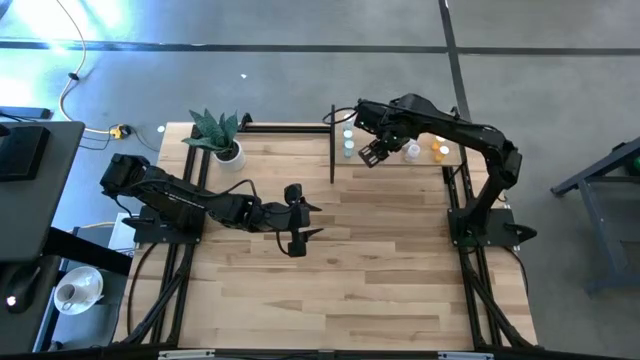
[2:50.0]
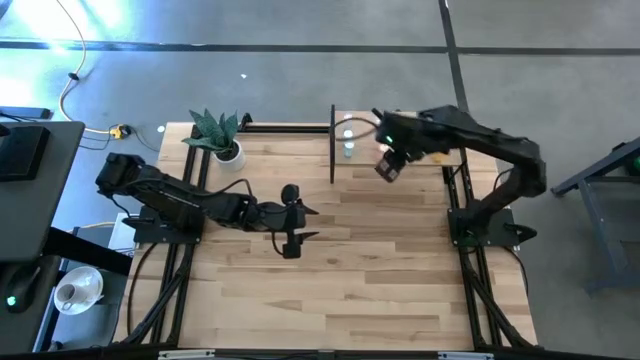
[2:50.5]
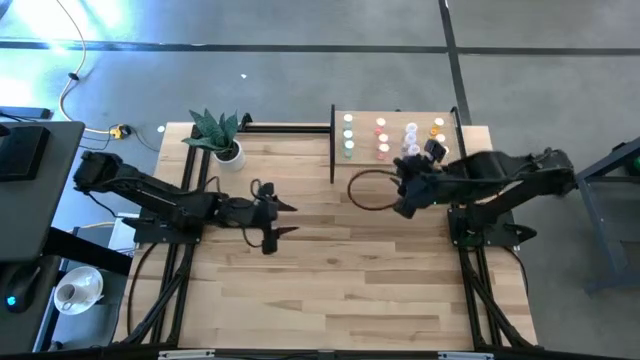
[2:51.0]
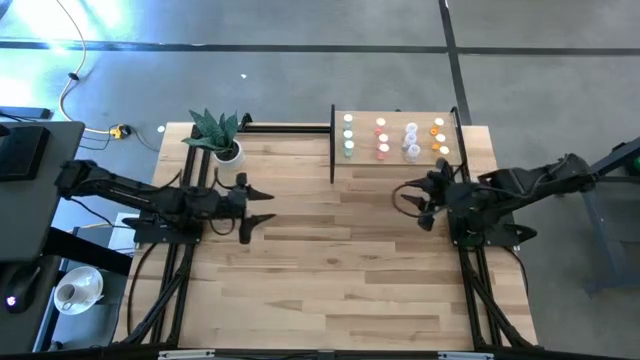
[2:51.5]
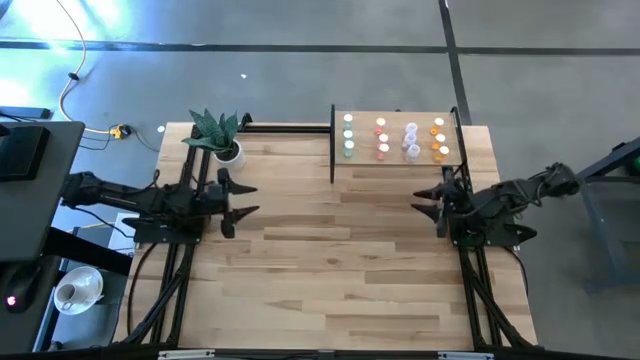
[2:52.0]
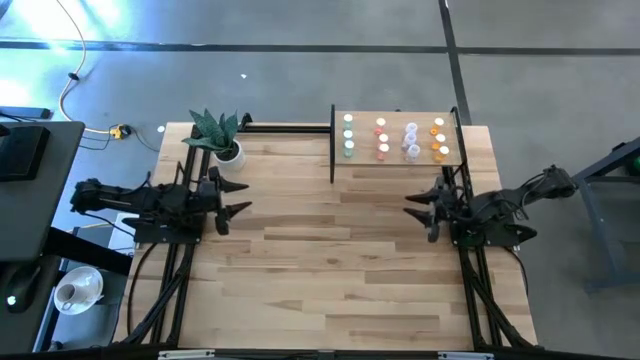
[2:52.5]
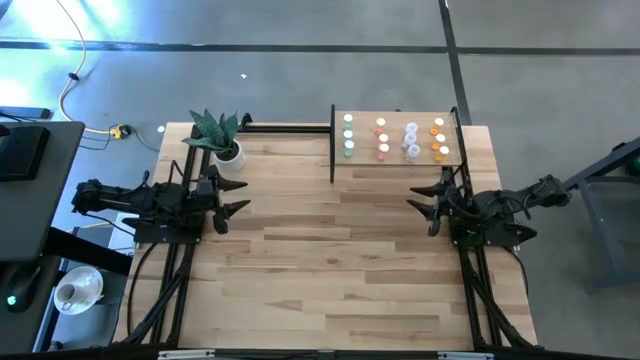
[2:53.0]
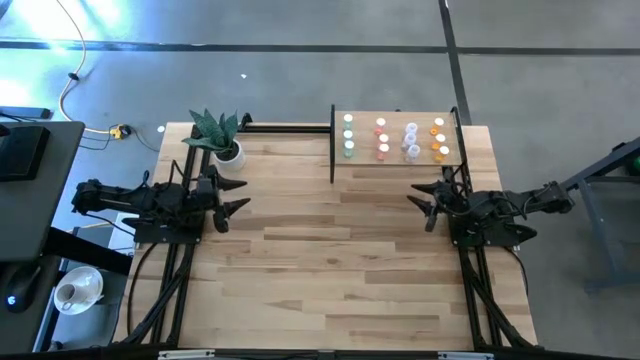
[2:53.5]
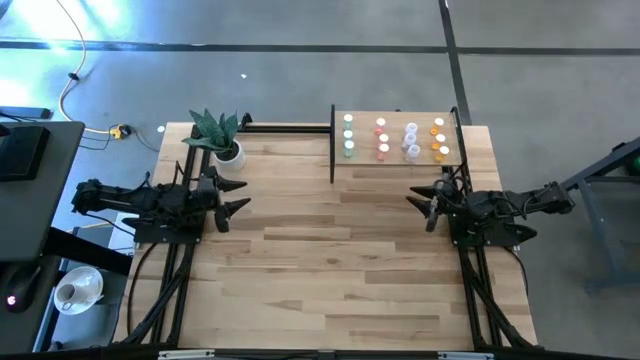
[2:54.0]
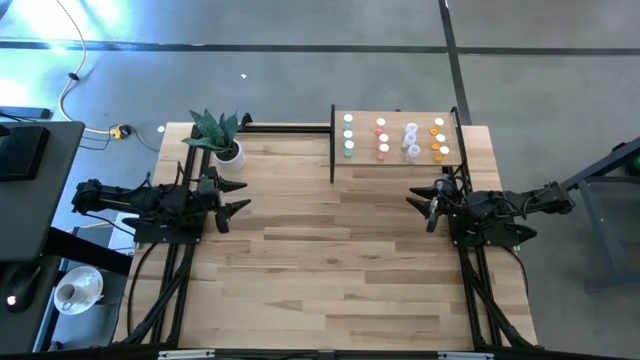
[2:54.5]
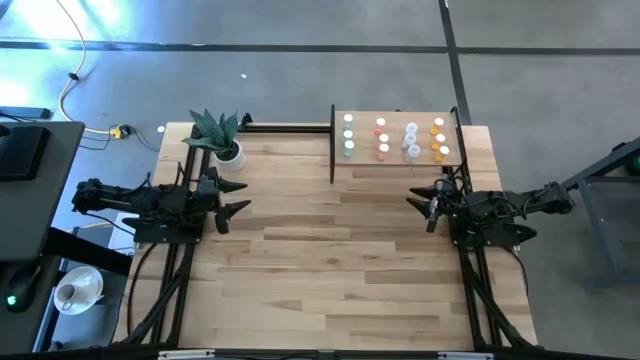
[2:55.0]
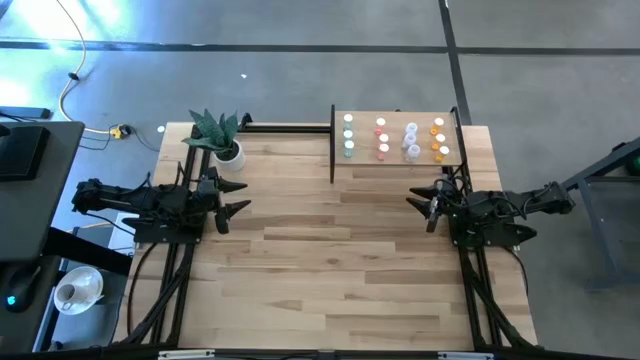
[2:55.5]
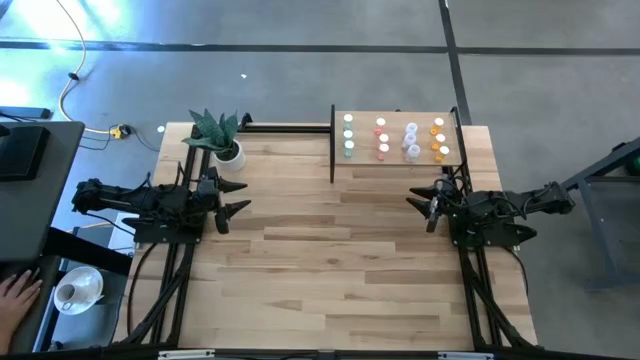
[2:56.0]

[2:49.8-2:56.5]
Task: Pick and place medicine bottles onto shelf by color
Return to Home position

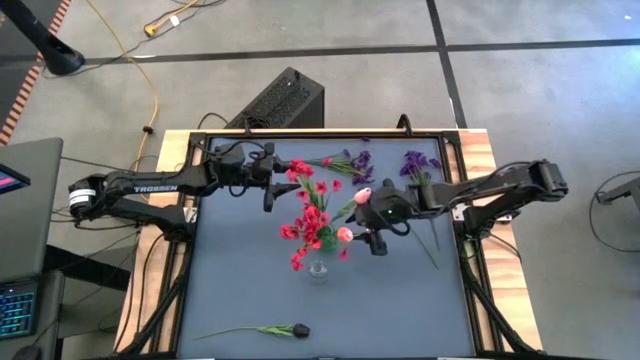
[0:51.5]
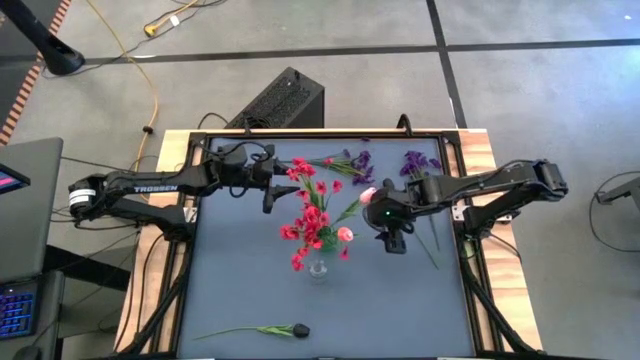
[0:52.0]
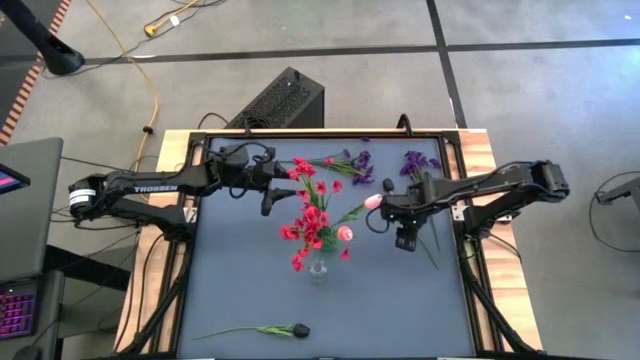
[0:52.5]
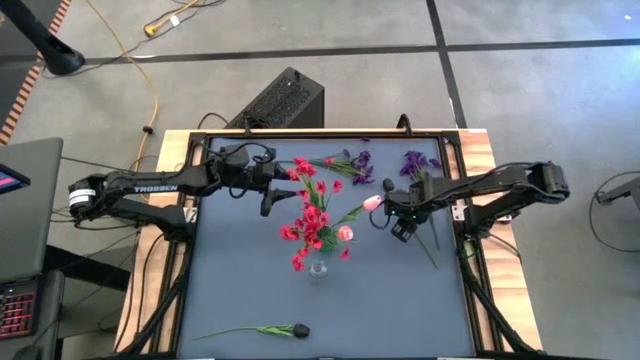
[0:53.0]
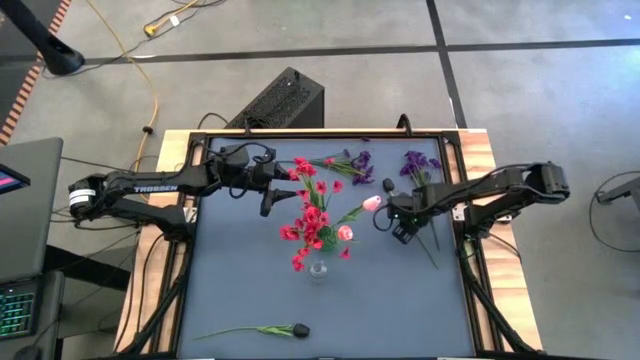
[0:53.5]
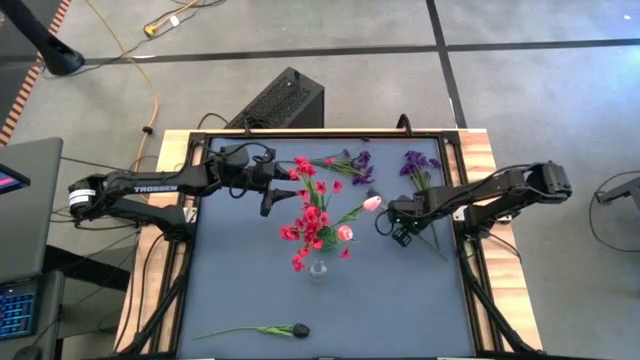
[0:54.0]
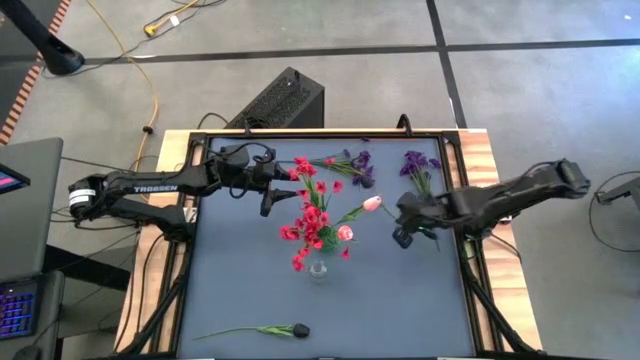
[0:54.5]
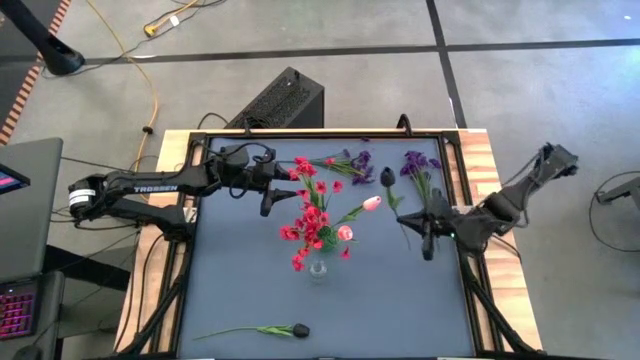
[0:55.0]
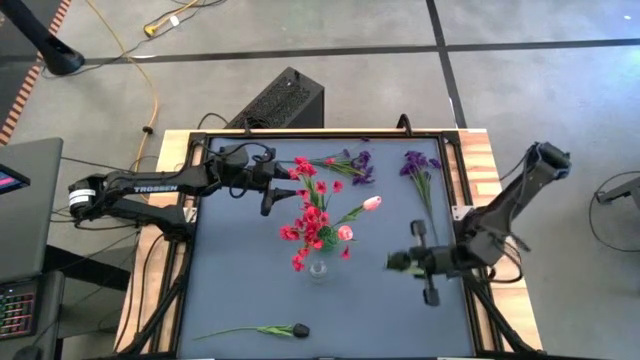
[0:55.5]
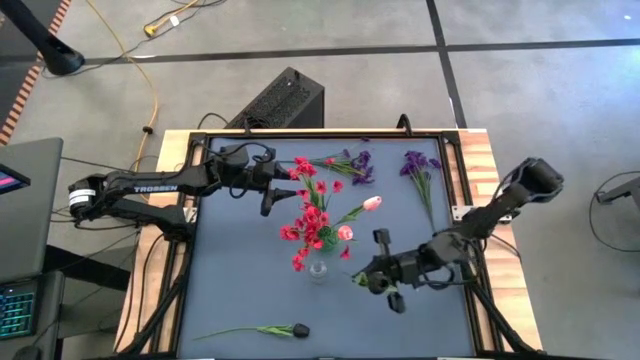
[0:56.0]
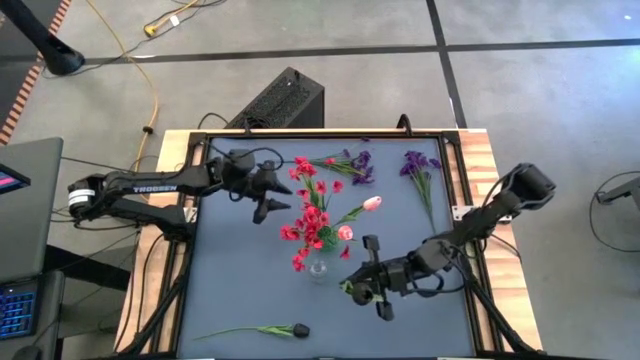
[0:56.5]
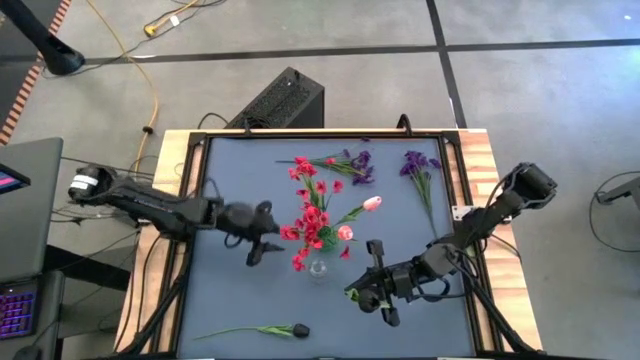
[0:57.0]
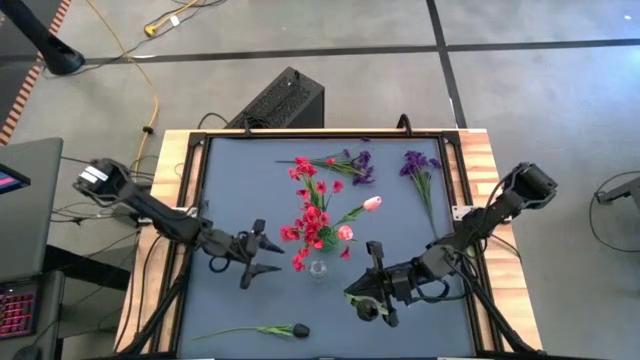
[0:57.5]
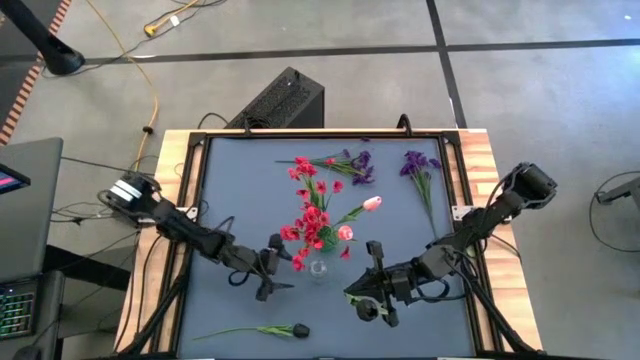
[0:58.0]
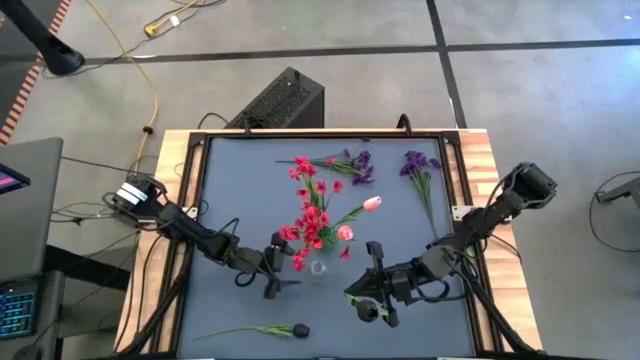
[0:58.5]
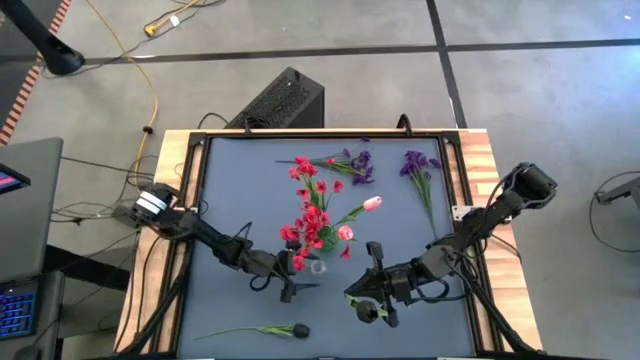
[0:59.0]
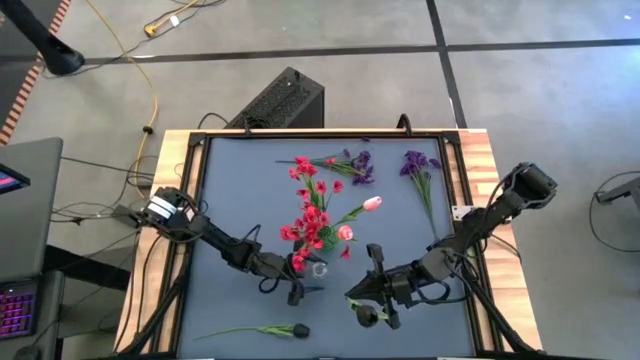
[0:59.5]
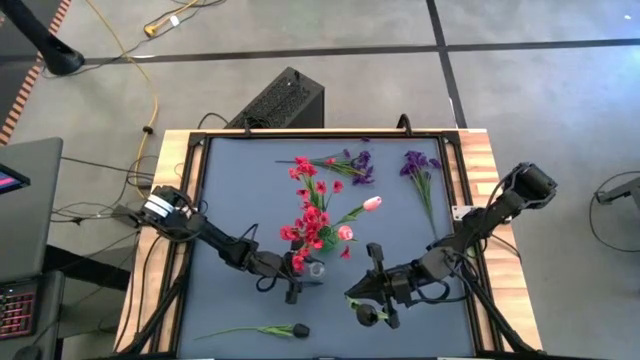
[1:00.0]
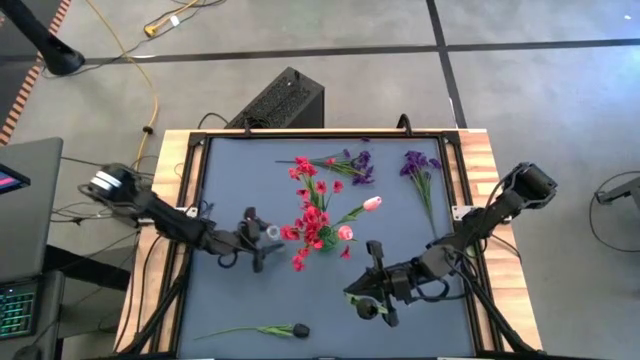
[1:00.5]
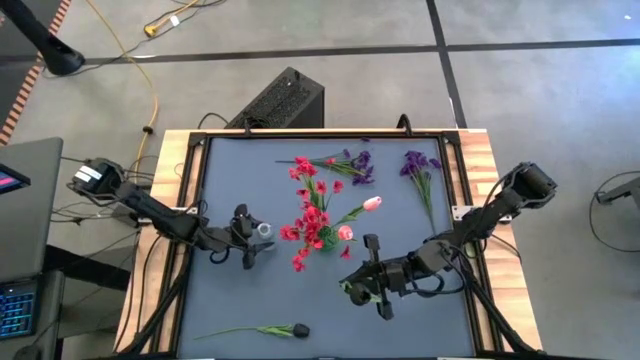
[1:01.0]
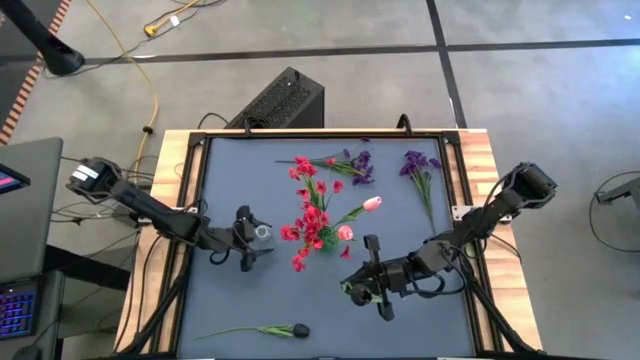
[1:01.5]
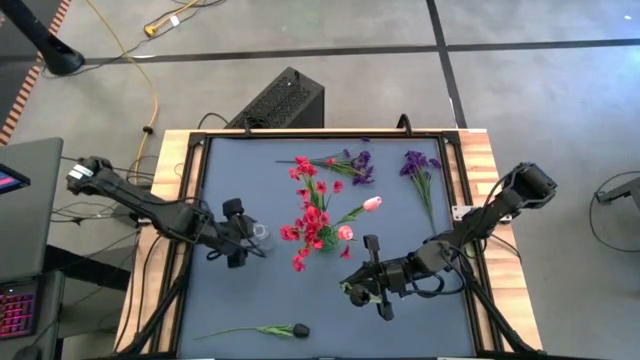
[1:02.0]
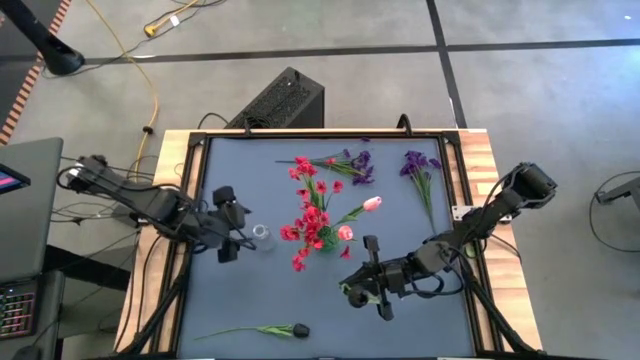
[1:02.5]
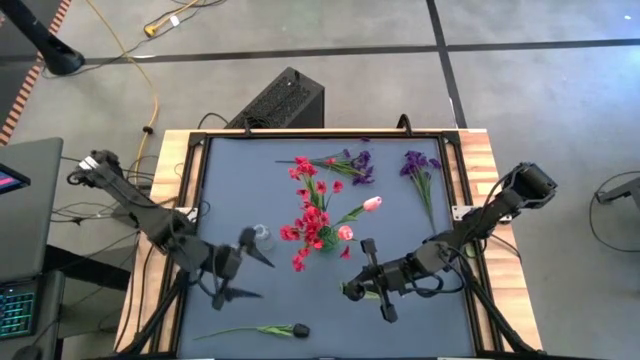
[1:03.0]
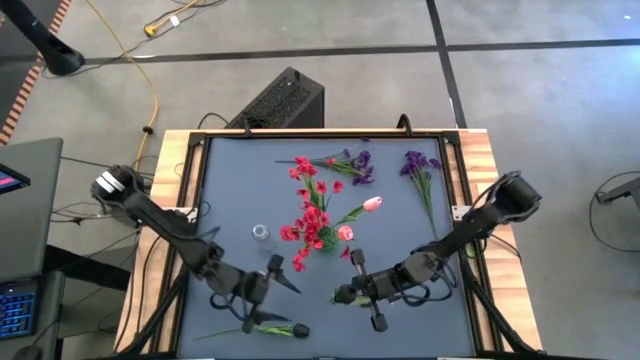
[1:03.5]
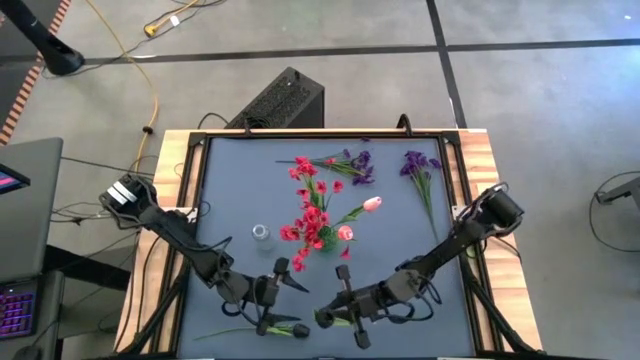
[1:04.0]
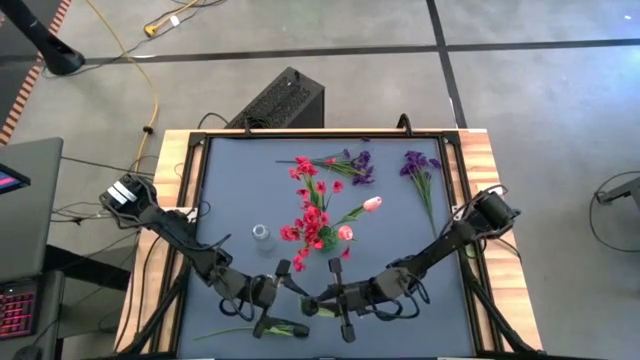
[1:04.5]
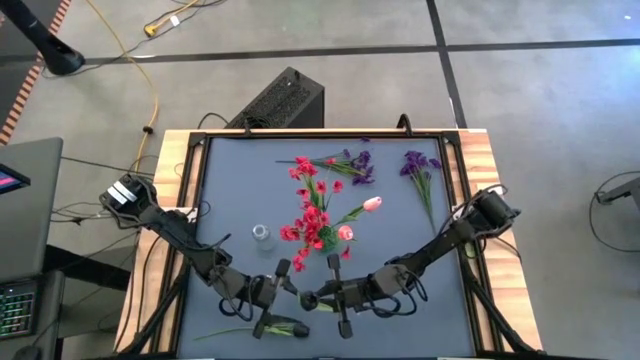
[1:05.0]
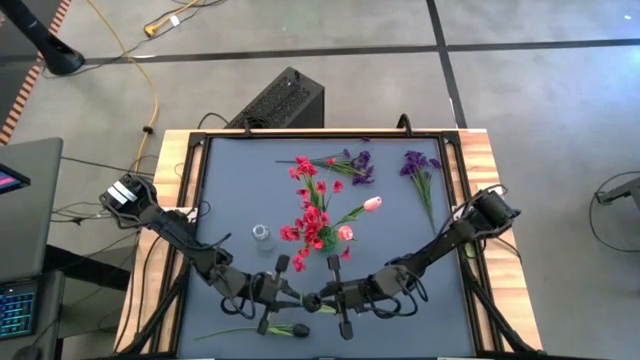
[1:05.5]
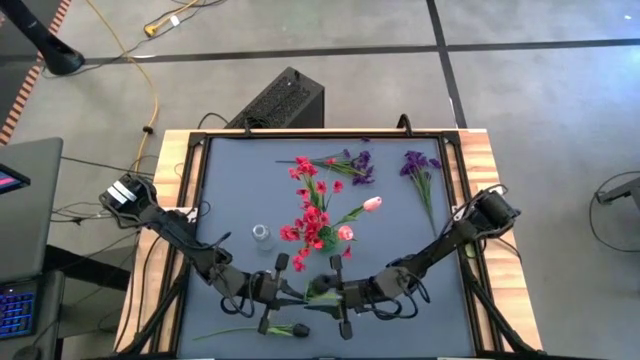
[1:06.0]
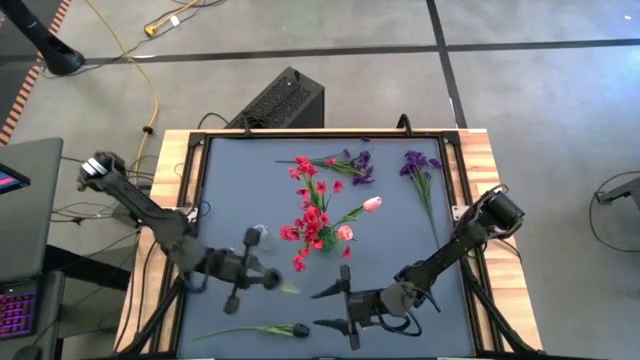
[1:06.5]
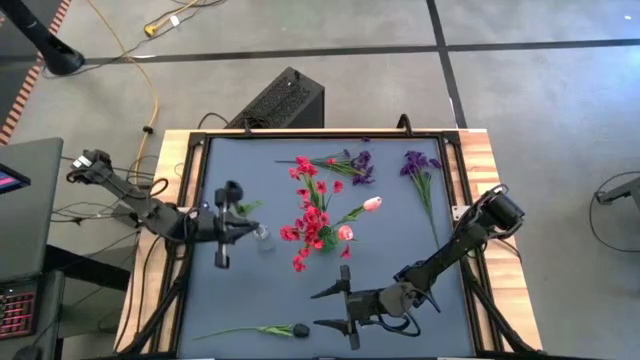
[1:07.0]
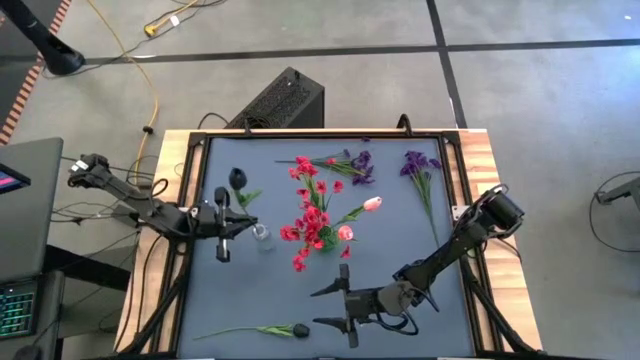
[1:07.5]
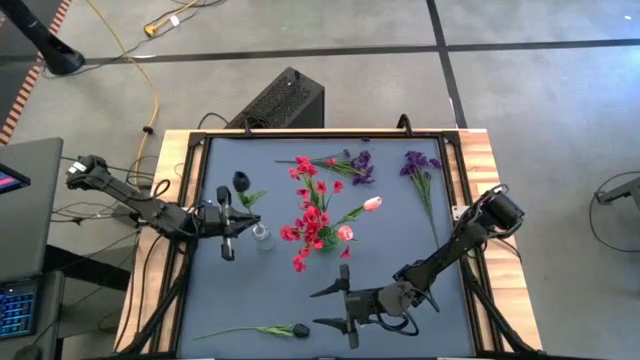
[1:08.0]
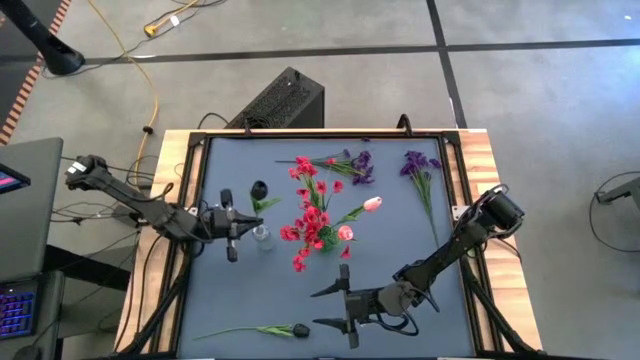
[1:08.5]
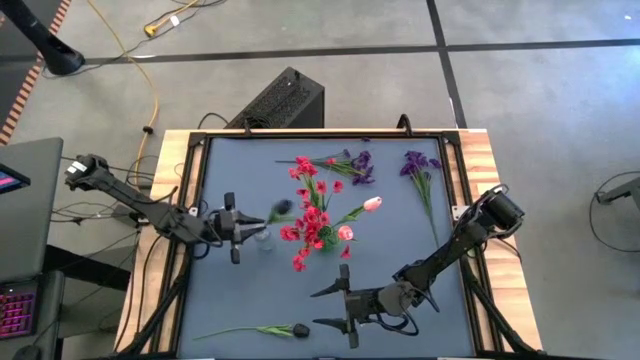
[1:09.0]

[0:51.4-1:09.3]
Task: Sort flowers into vase by color
Put the top black flower into the transparent vase
